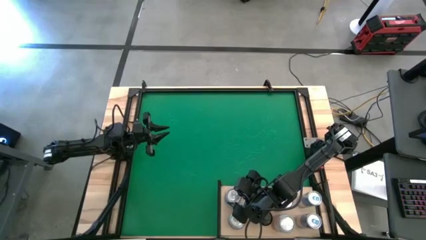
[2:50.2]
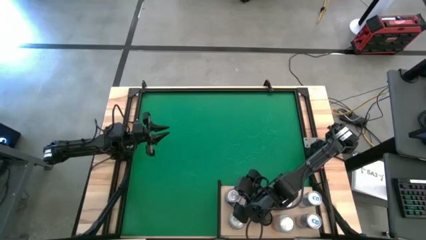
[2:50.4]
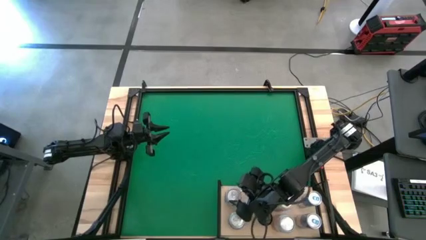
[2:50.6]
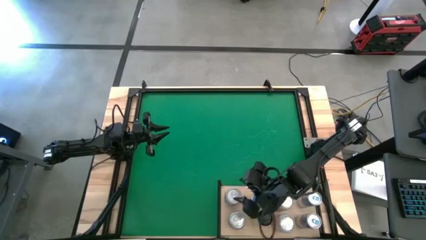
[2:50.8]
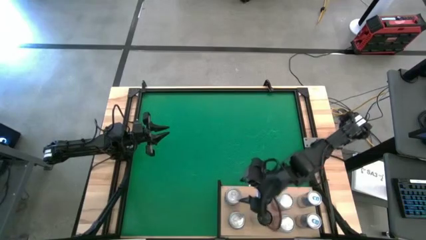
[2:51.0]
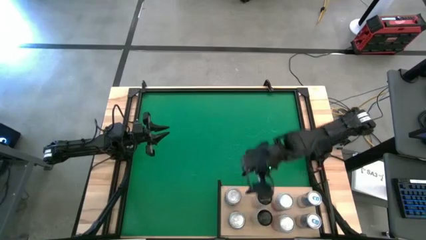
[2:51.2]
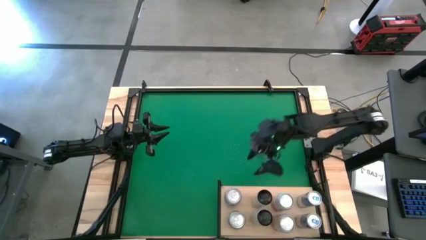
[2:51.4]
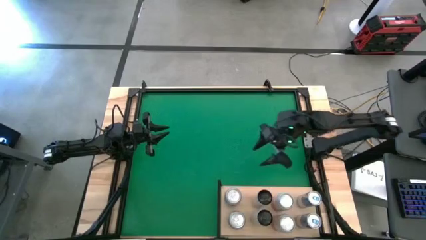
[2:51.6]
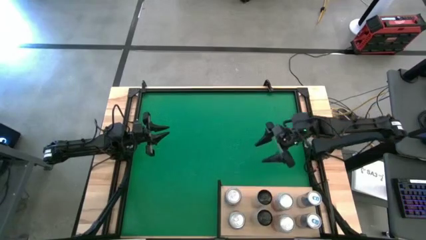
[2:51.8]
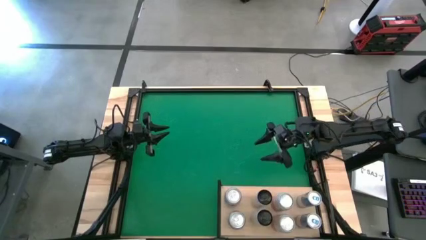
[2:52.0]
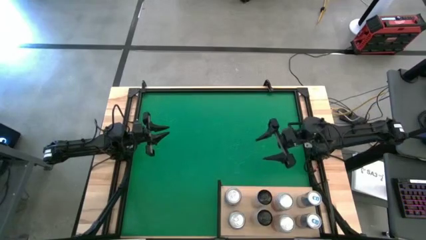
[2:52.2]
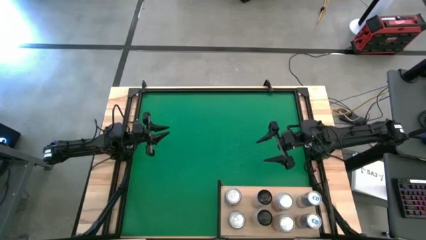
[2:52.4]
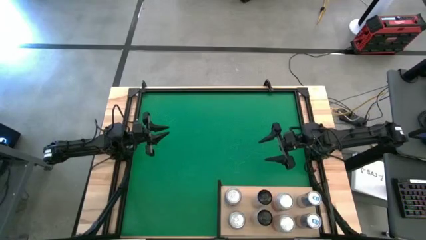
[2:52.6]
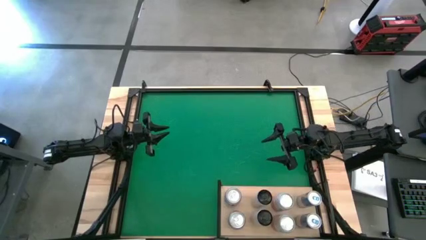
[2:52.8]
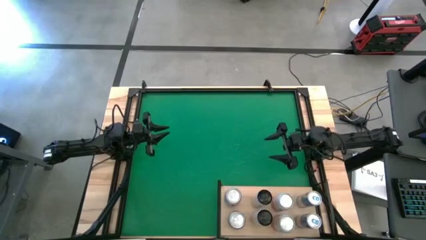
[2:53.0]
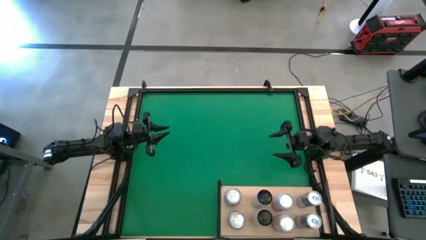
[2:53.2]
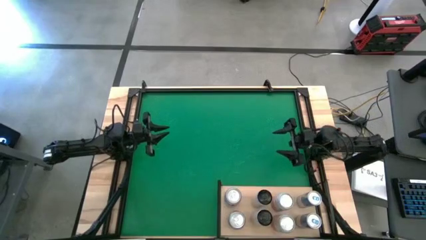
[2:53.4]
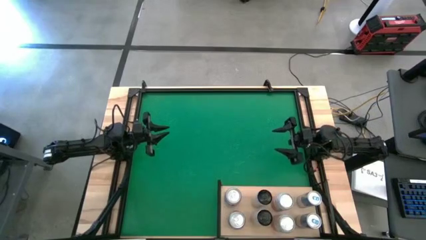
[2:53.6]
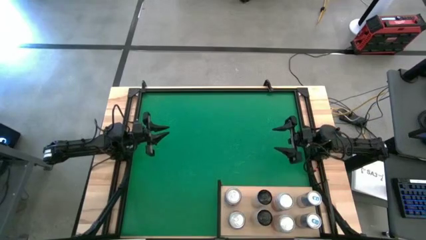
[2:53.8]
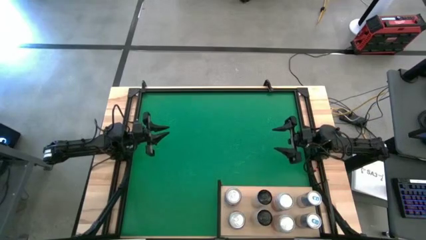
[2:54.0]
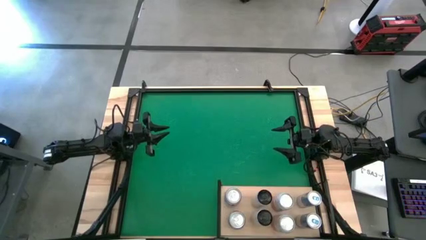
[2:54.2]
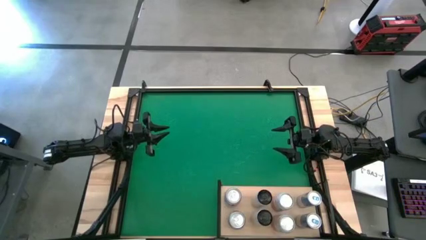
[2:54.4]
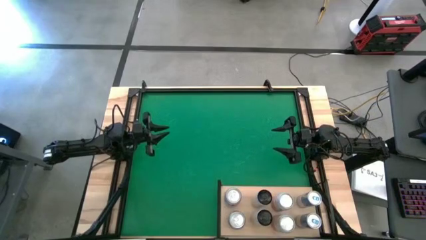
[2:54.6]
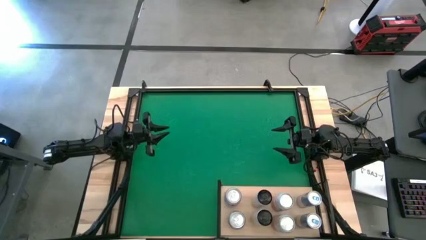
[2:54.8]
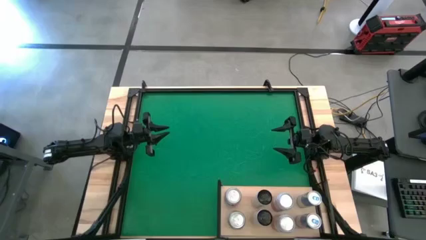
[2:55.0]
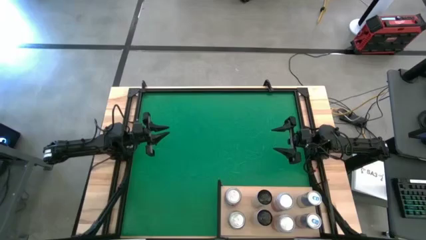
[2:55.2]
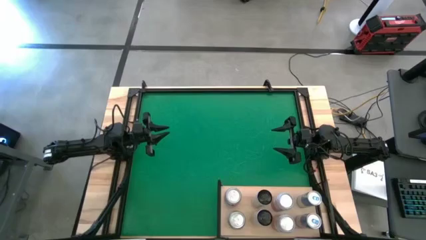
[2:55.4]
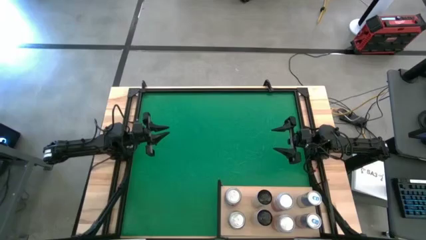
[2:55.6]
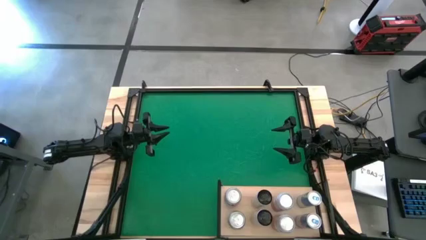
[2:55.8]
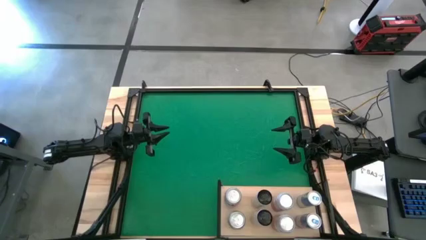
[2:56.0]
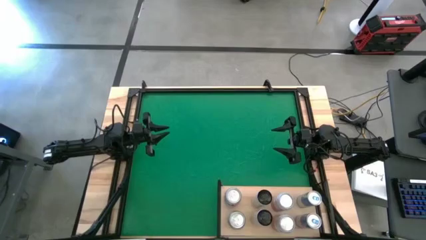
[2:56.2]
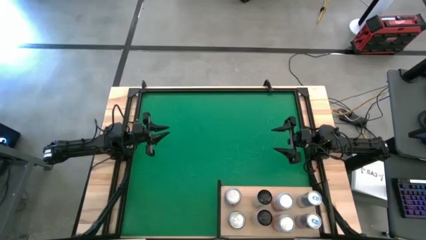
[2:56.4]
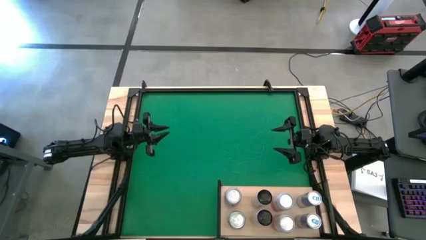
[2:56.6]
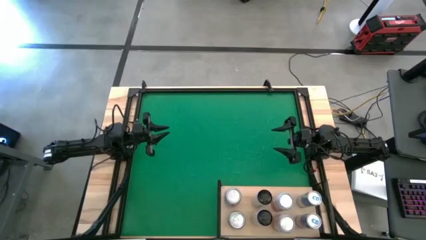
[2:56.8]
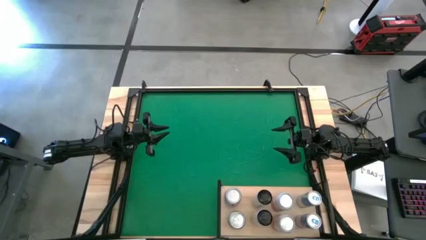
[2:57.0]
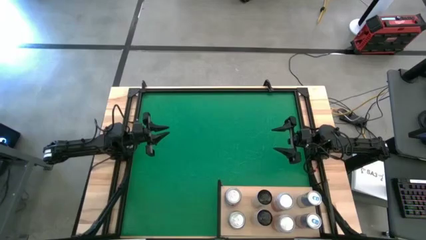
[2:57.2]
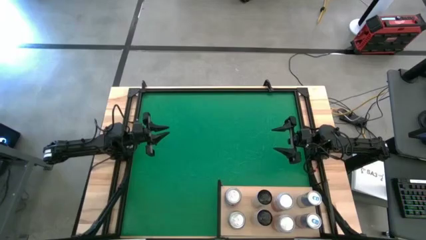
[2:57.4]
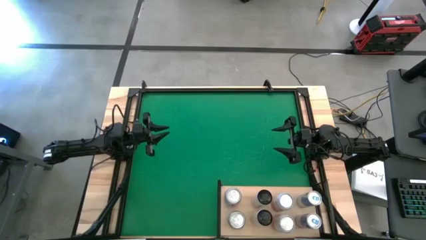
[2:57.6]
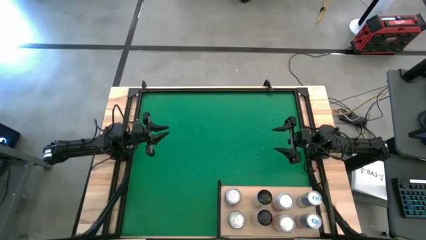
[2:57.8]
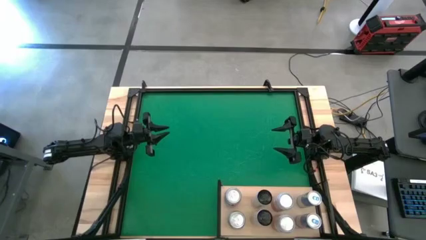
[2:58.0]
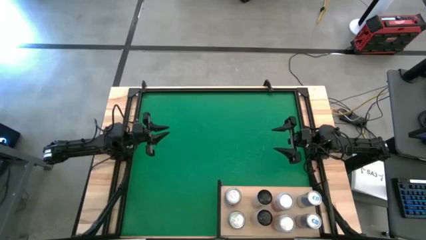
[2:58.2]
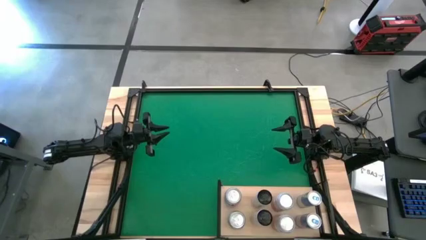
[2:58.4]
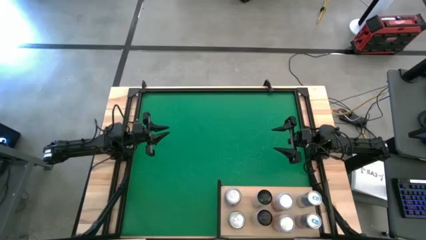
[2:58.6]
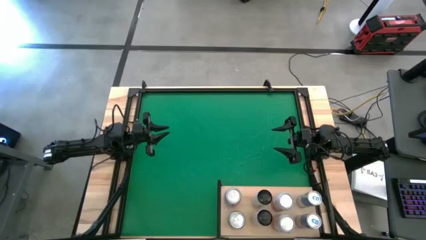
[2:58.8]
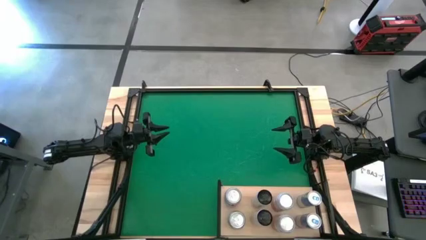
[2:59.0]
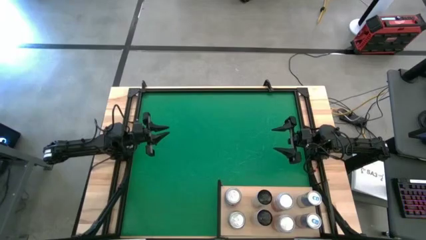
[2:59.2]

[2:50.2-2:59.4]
Task: Place canned beverage on shelf
Return to Home Position

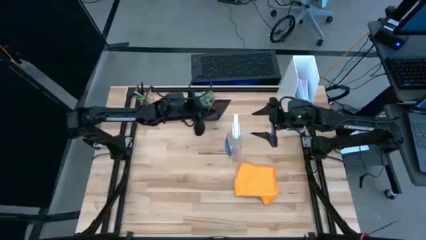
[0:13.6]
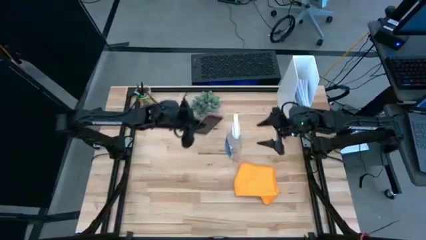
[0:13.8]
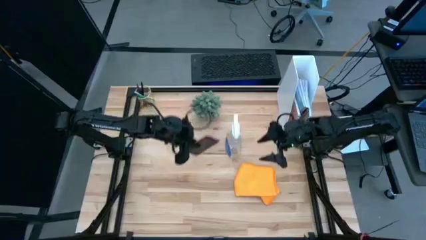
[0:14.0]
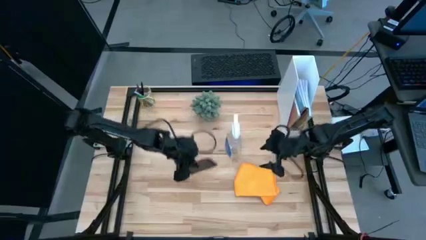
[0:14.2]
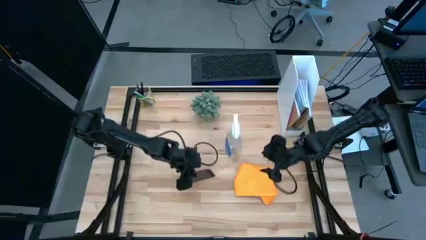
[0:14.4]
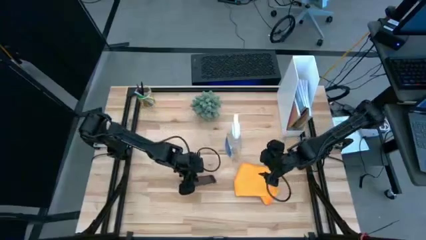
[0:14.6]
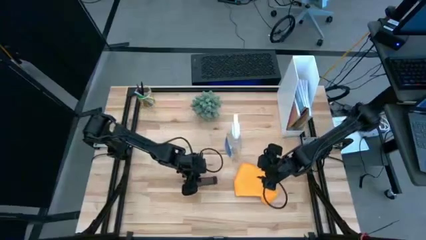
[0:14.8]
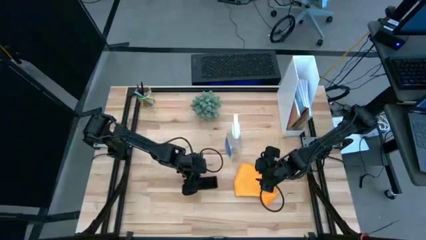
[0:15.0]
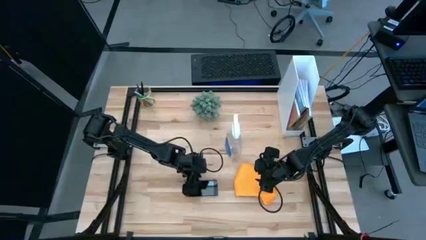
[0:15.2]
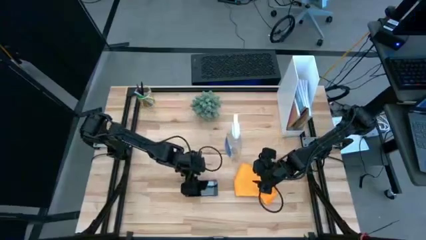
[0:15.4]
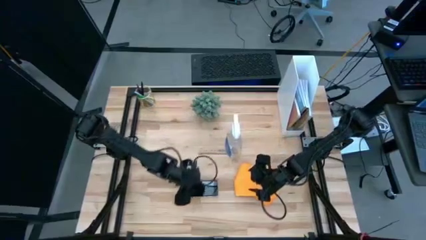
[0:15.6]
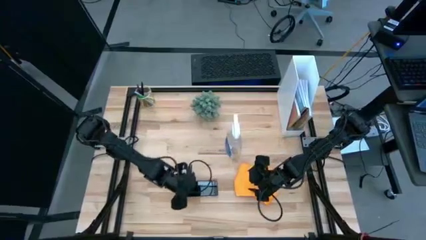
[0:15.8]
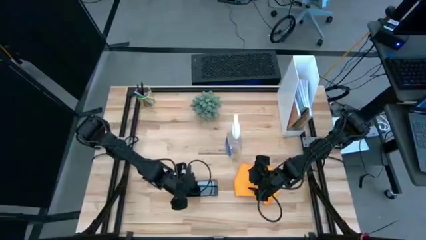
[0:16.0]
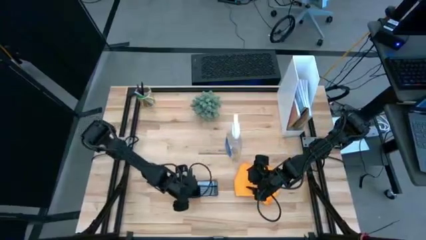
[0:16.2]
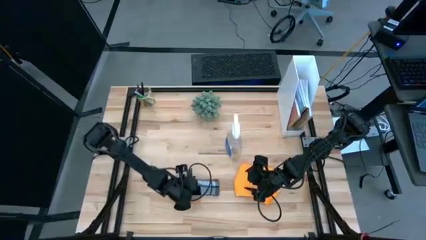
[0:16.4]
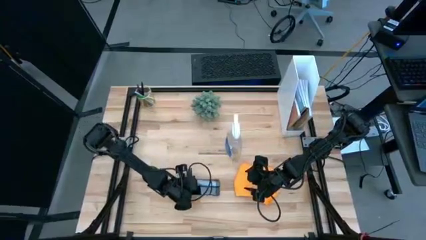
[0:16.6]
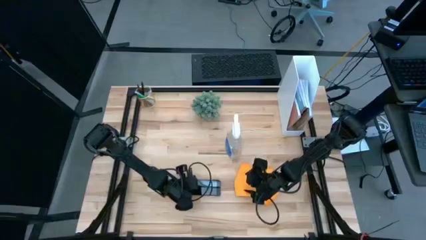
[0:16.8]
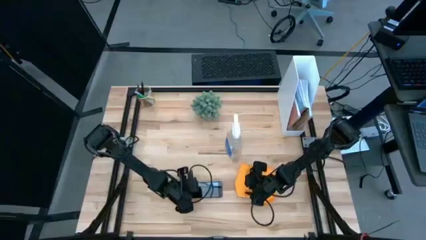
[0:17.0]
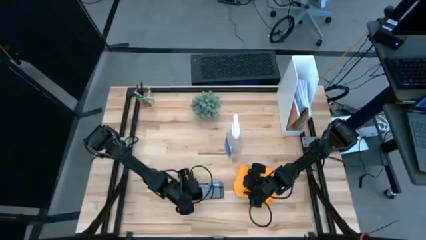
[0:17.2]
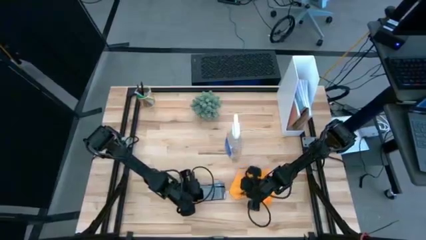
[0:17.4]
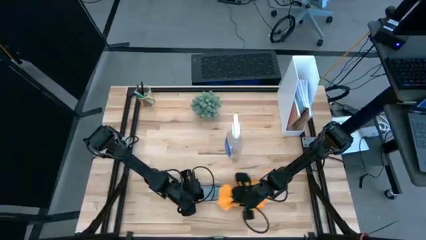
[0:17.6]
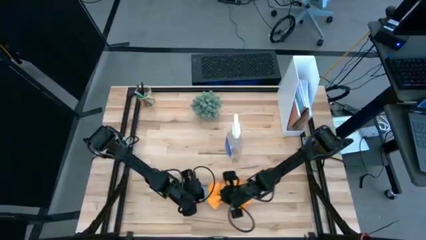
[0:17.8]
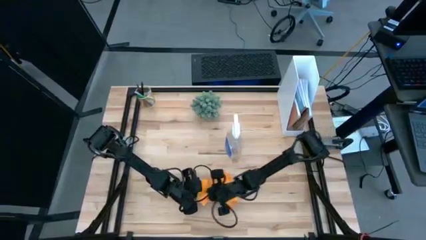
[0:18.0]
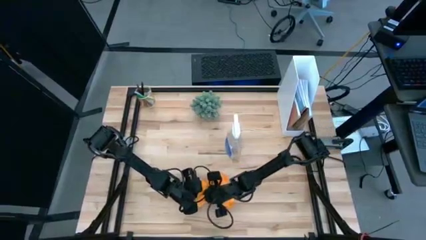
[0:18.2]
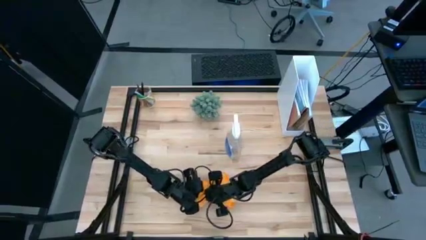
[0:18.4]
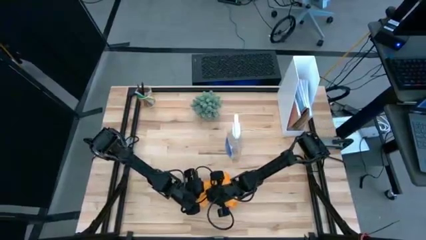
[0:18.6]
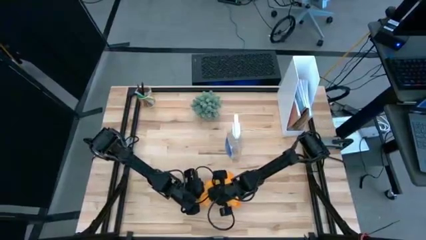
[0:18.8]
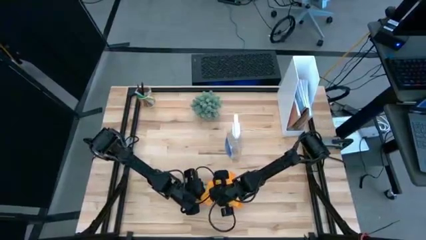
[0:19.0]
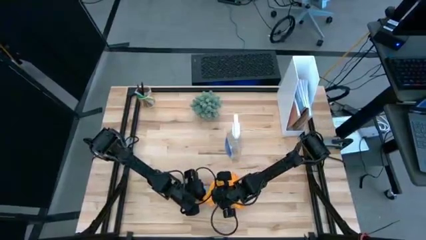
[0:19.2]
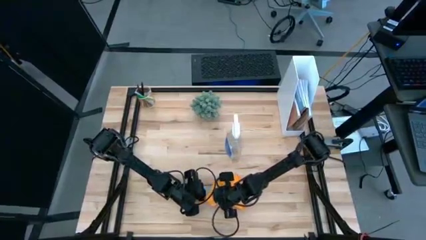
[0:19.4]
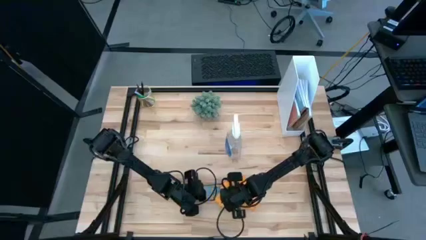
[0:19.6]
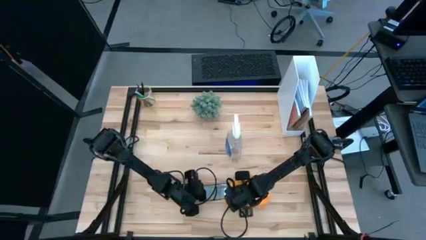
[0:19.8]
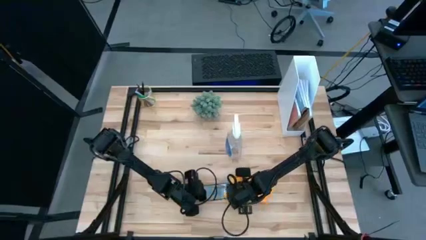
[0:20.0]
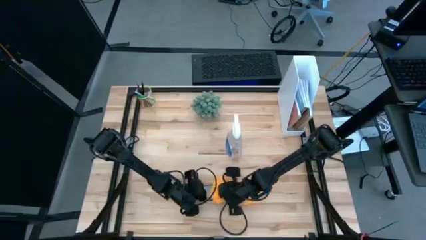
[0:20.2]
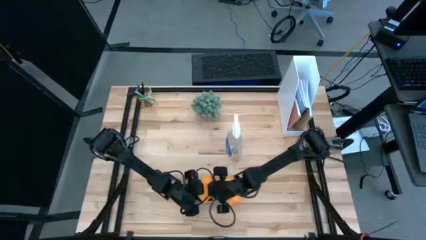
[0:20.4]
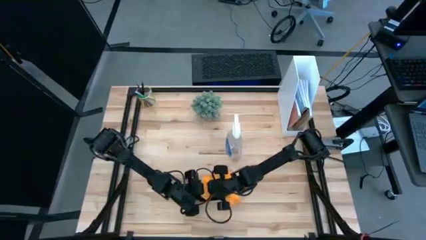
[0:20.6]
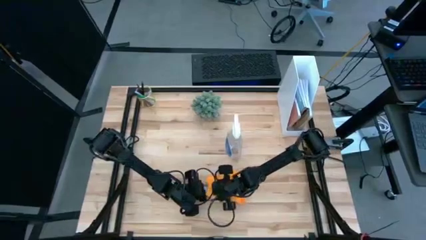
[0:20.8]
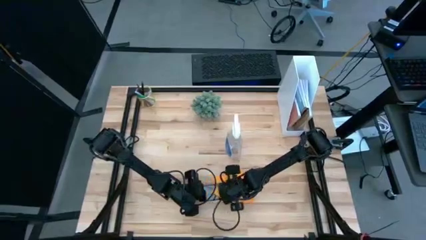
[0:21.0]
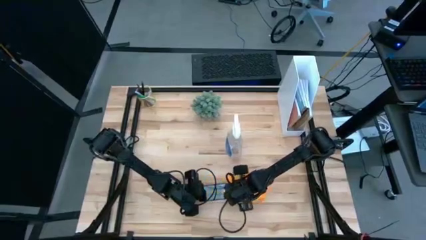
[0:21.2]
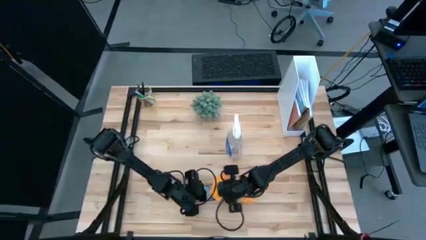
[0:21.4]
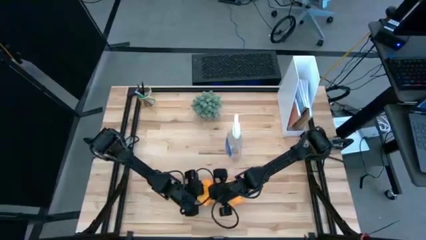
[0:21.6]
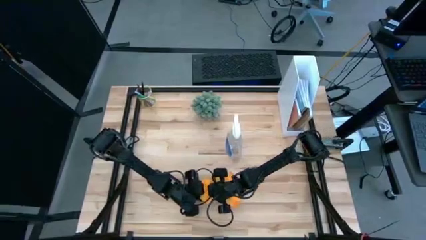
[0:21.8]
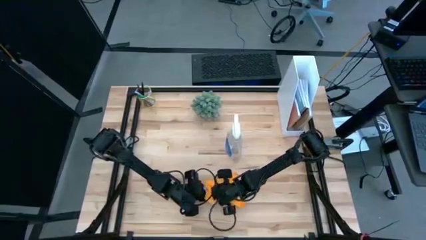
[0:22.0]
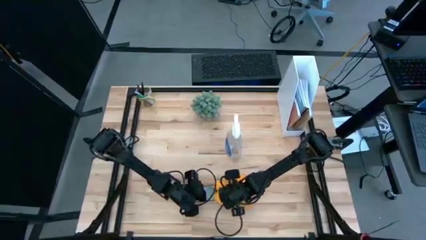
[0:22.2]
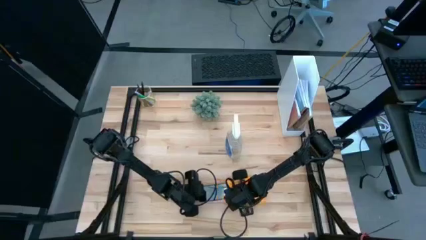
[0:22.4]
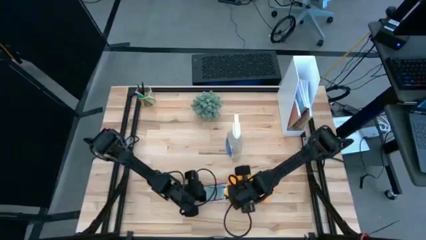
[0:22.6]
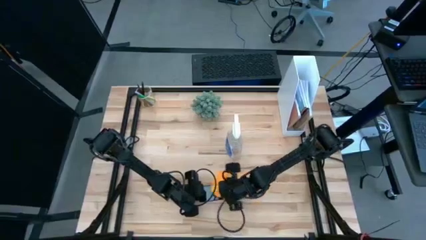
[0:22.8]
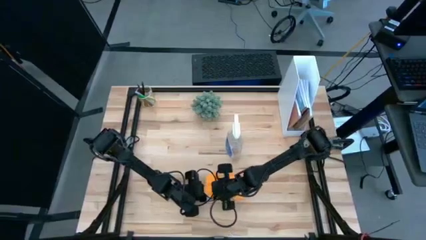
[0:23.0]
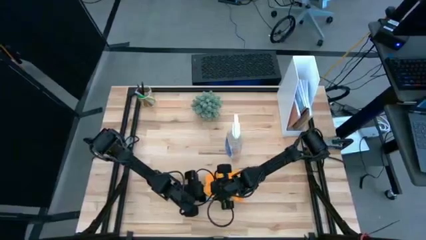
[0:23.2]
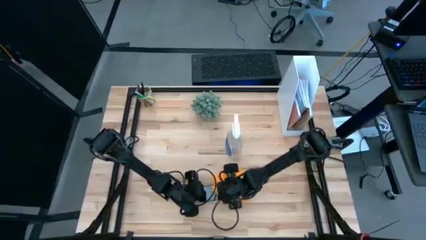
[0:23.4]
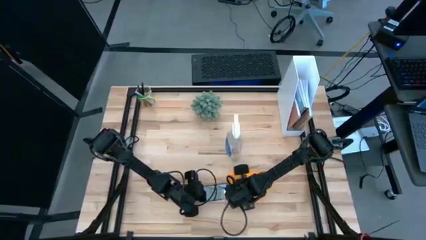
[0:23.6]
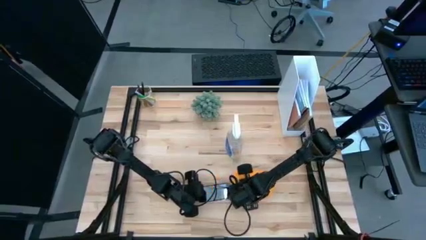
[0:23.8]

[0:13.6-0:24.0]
Task: Apply microfiber cloth
Wipe the cellphone with the microfiber cloth
